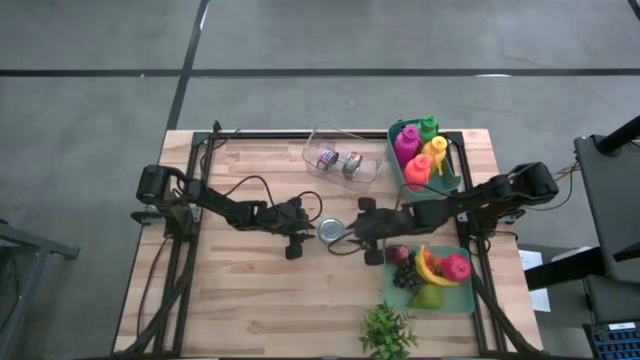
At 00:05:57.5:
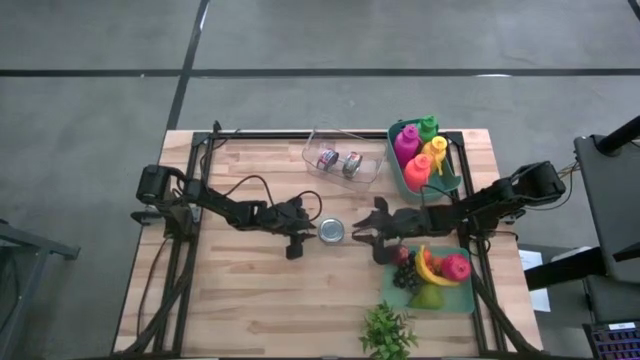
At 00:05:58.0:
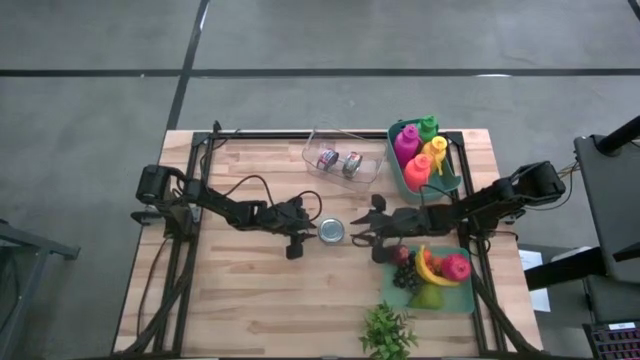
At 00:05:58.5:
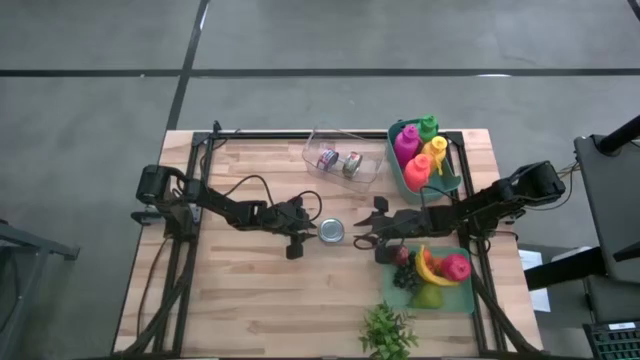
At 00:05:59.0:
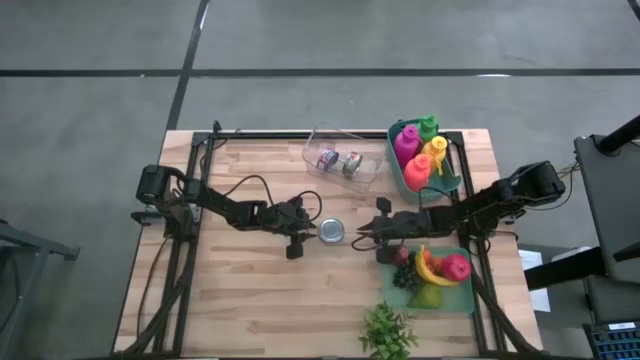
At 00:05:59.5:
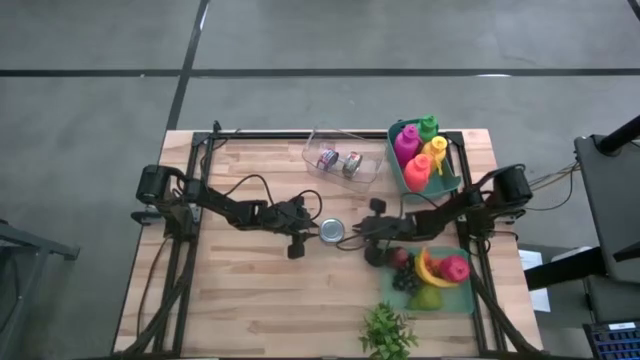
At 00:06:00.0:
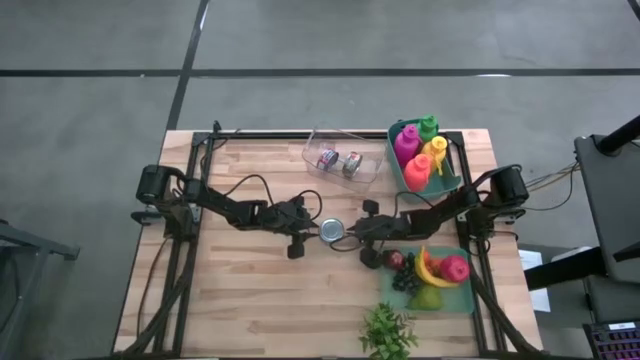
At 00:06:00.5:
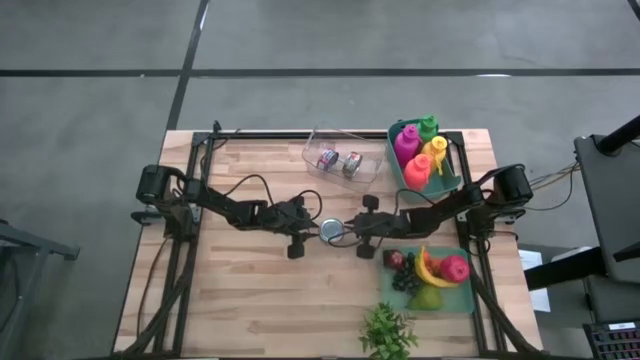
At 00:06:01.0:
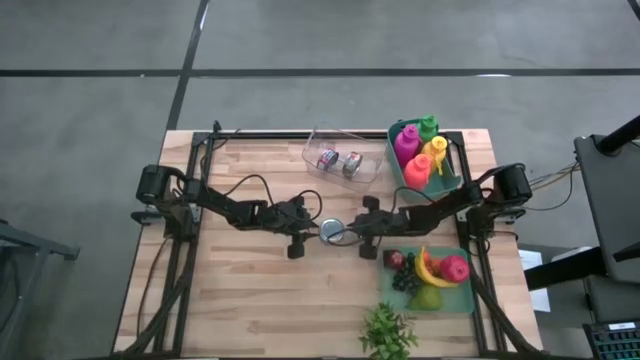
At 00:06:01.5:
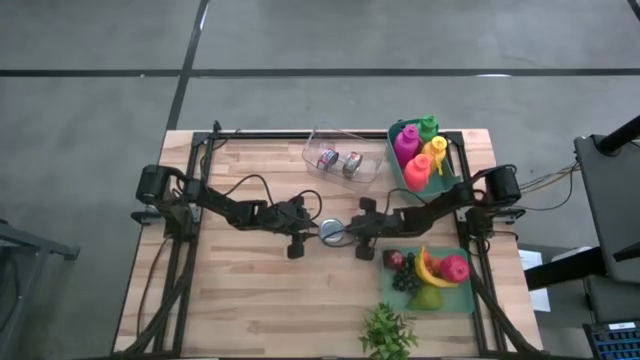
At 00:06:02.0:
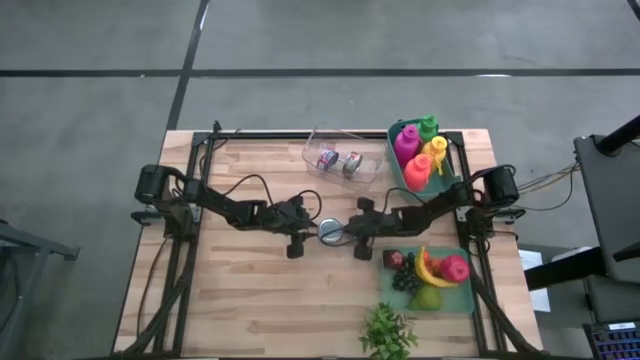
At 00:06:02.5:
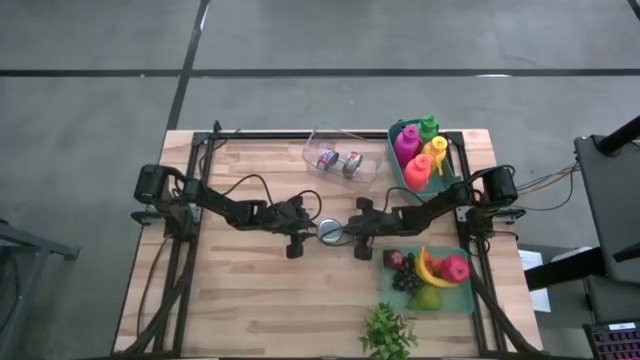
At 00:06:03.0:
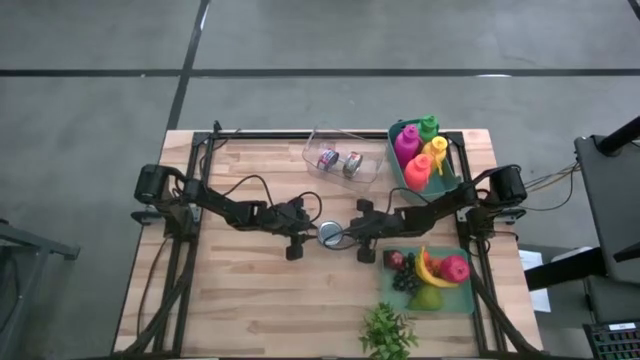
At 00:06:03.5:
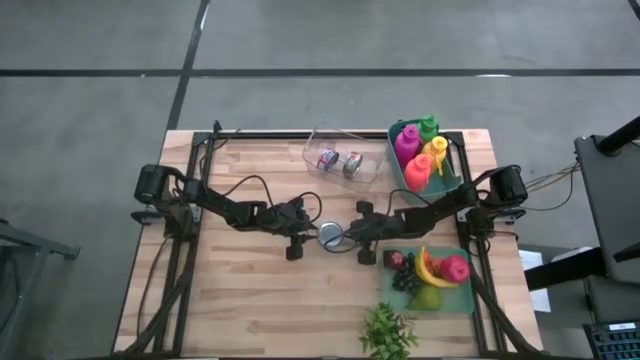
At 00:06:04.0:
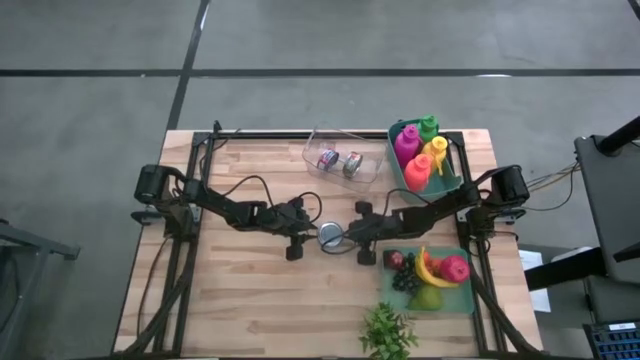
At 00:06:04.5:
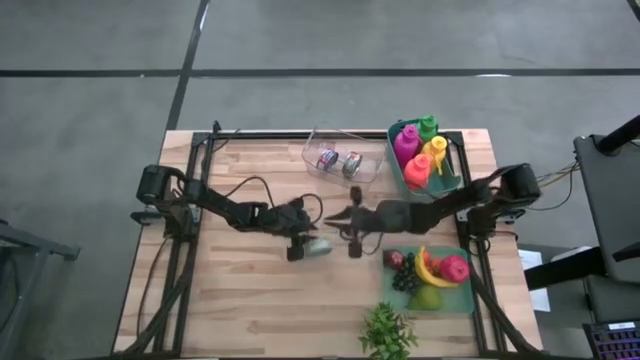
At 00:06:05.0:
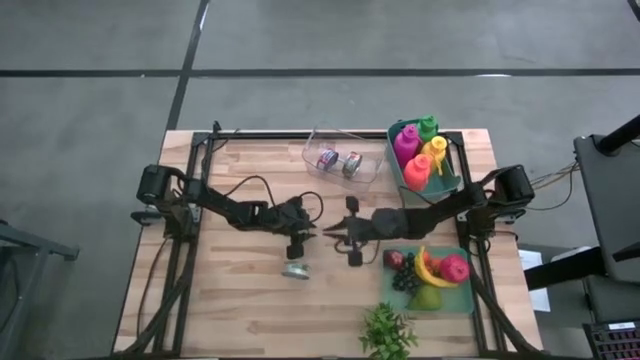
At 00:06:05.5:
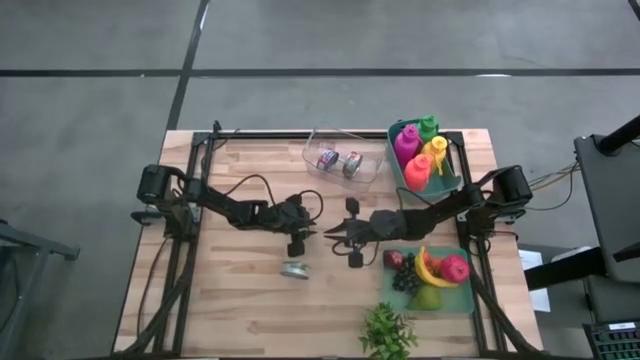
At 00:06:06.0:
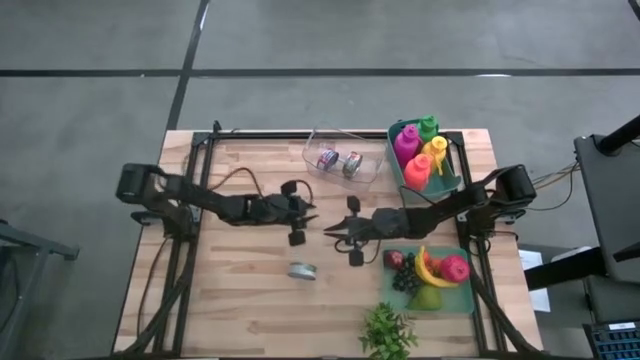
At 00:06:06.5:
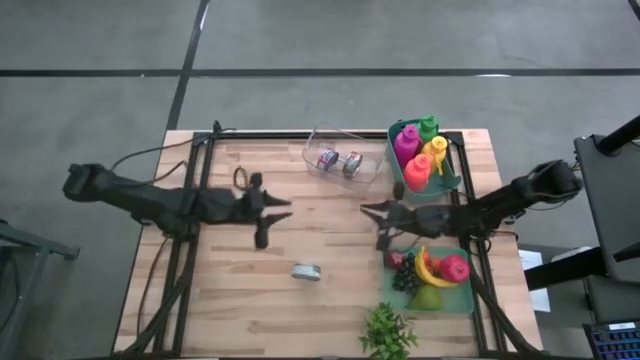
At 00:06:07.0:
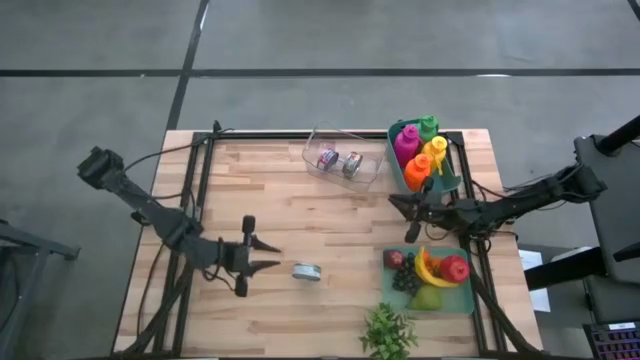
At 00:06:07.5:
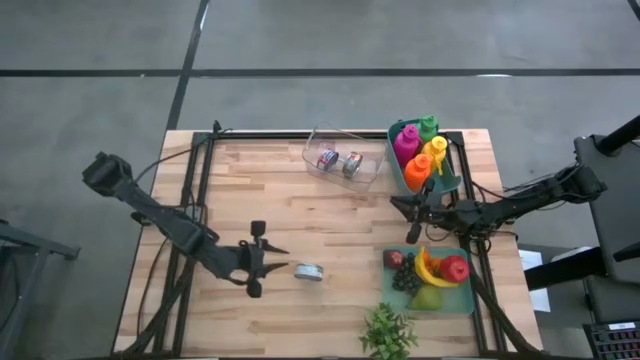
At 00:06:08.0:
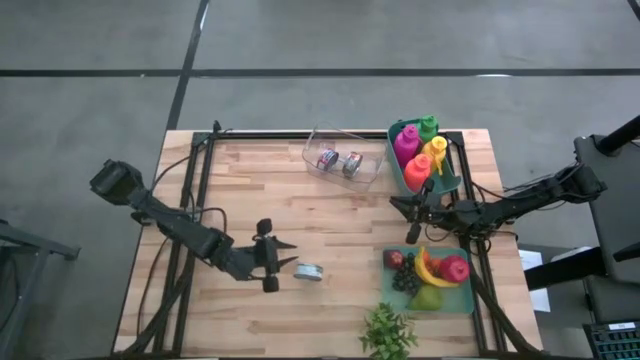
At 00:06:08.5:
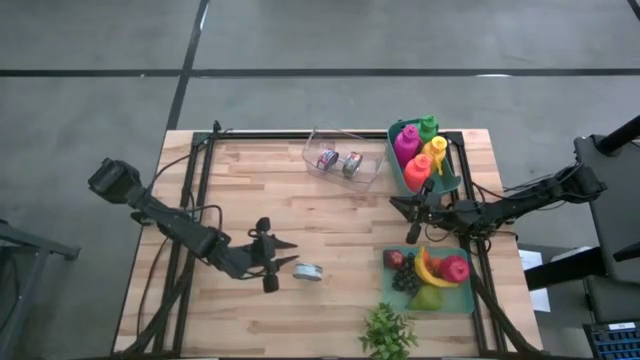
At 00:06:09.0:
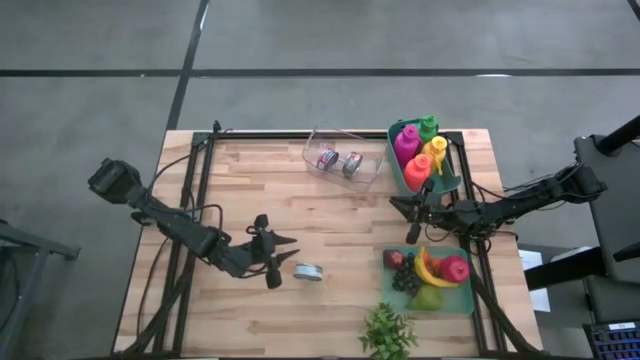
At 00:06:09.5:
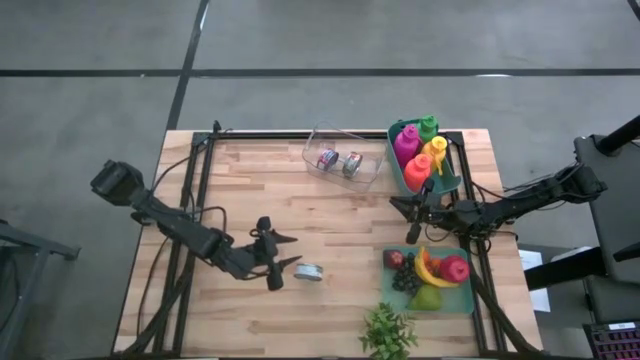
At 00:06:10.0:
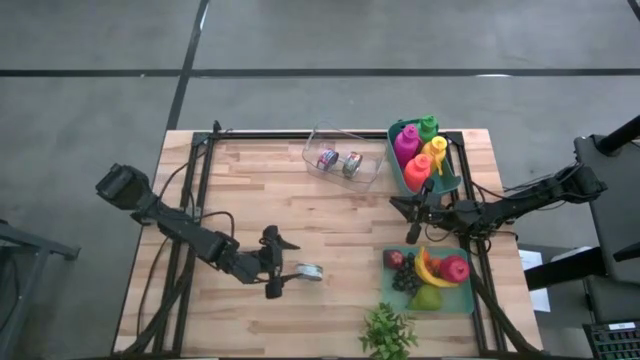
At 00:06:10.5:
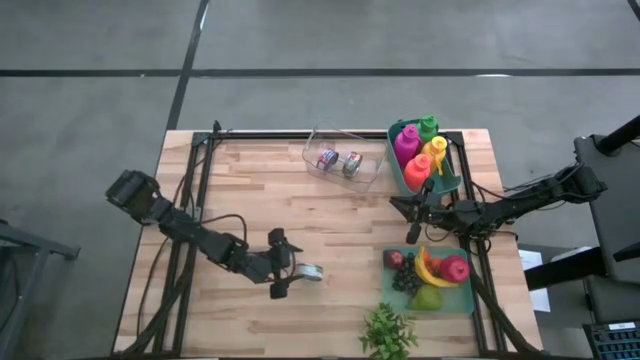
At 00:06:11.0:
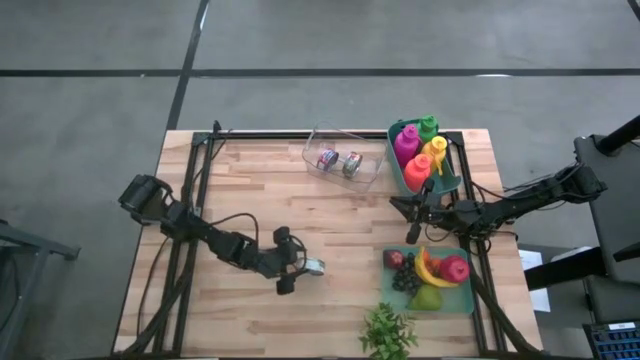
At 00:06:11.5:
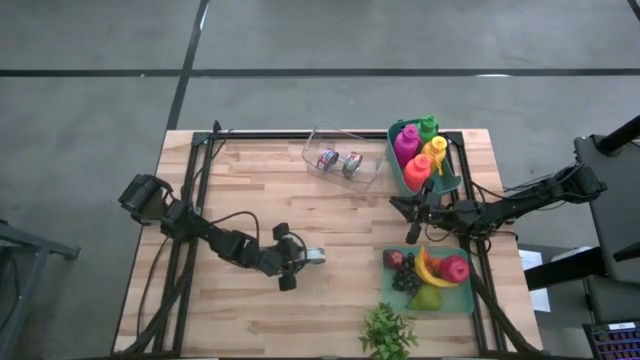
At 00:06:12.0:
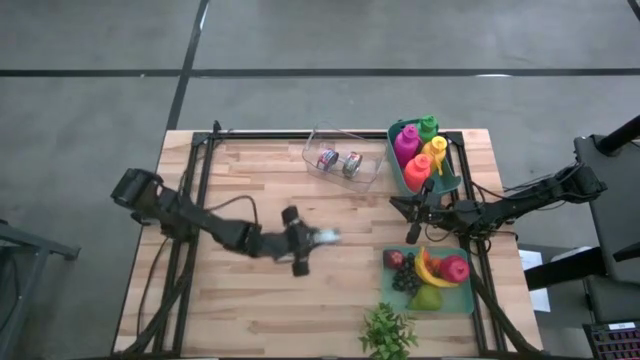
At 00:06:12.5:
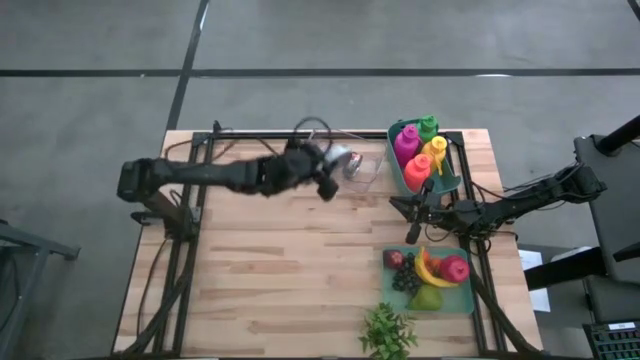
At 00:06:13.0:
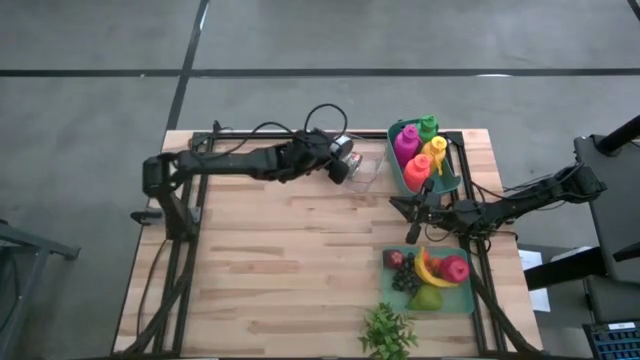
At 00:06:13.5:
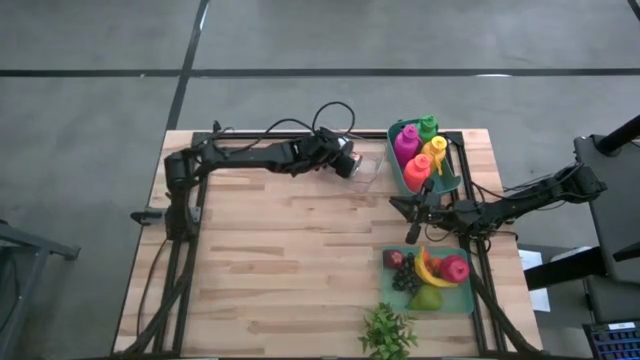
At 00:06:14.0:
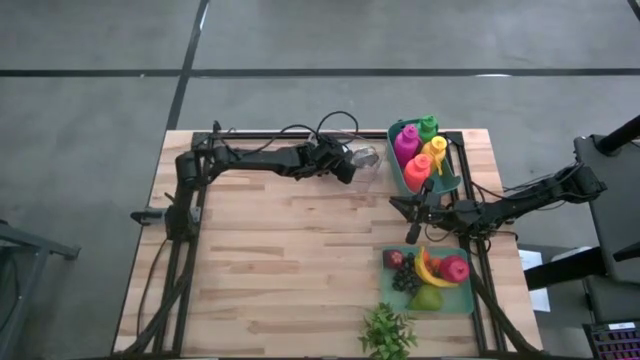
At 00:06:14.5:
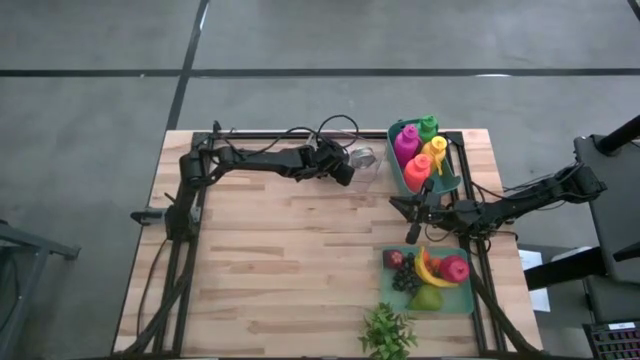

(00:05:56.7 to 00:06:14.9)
Task: Pick & Place Food Item
Put the green tuna can into the transparent bin

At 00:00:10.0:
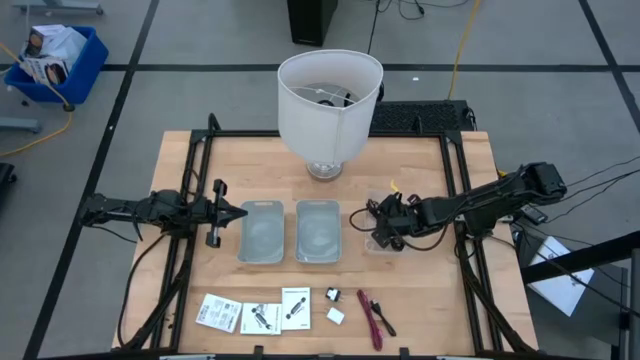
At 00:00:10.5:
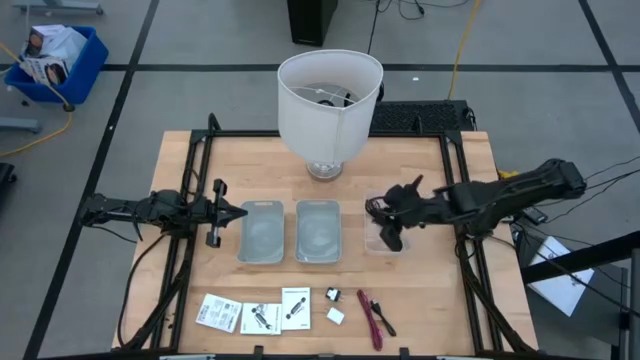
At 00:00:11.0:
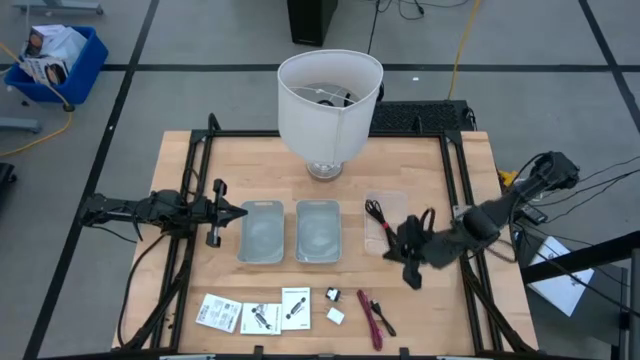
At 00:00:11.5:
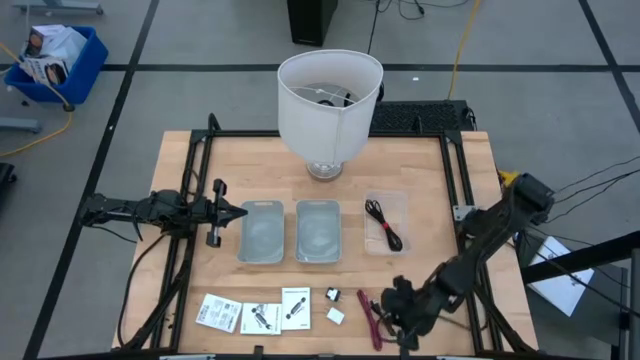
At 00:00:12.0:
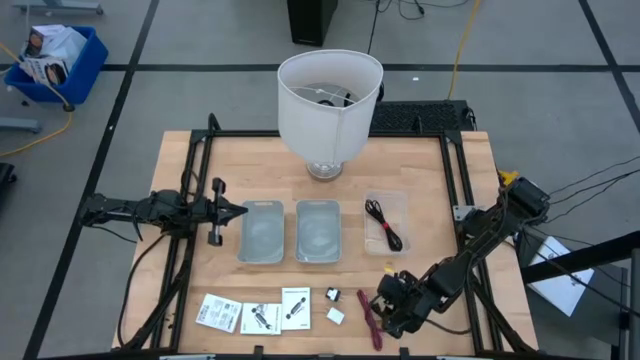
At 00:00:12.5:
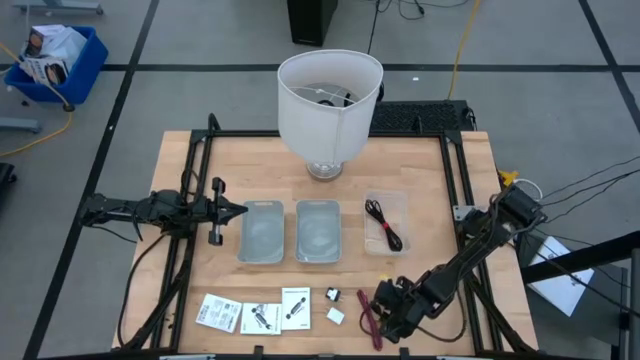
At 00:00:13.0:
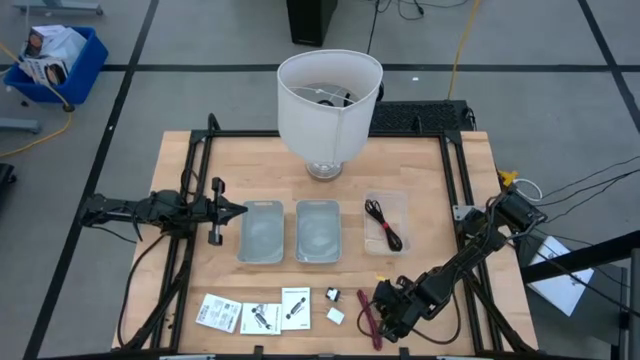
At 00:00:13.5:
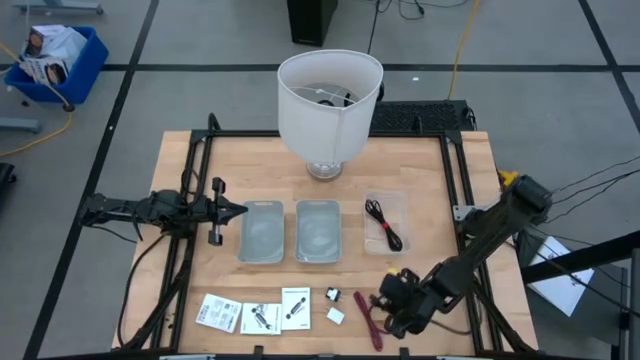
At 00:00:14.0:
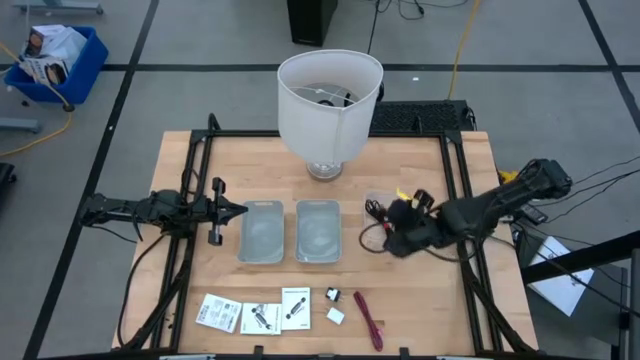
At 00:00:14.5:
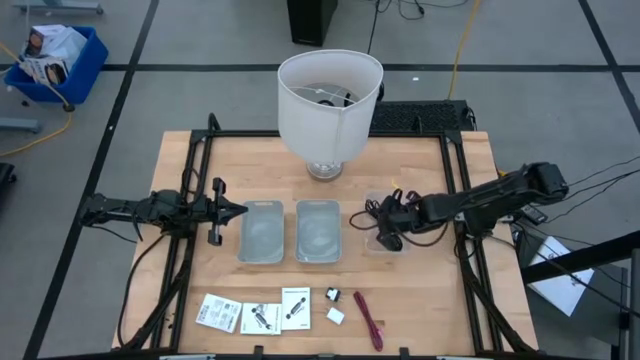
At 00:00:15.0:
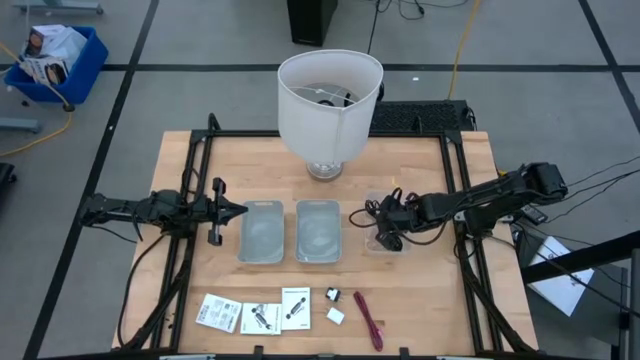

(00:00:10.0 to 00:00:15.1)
Task: Pick and place items into bin
Put the black charger cable into the transparent bin
